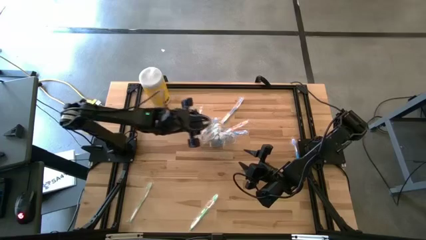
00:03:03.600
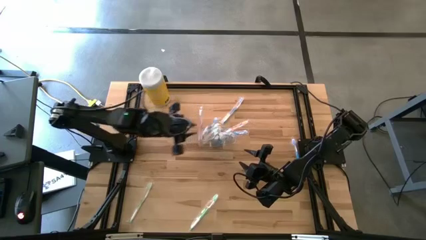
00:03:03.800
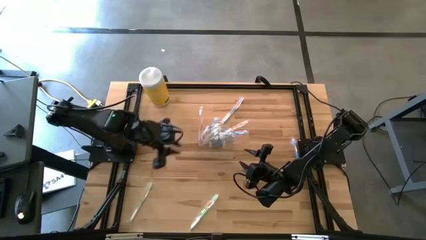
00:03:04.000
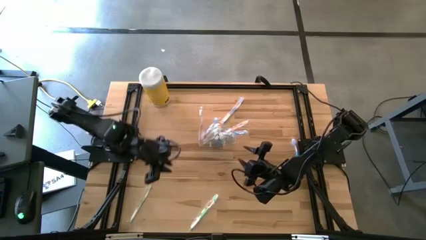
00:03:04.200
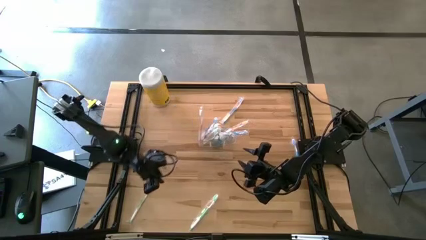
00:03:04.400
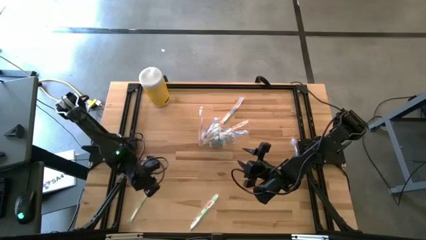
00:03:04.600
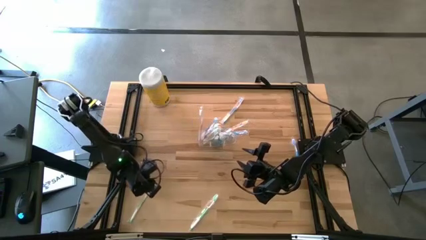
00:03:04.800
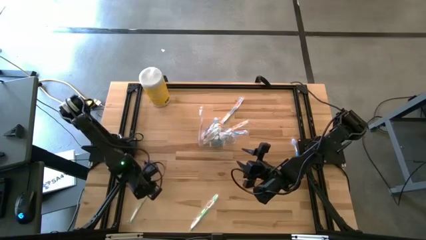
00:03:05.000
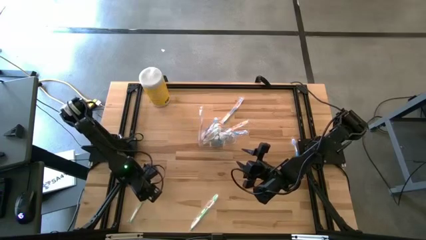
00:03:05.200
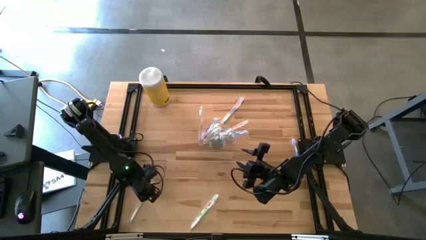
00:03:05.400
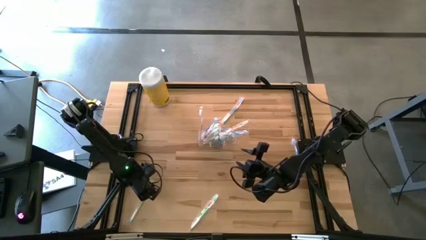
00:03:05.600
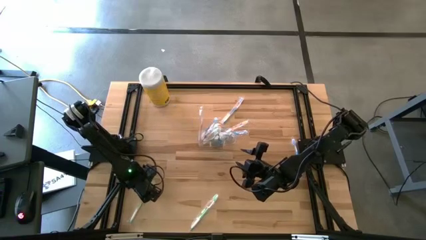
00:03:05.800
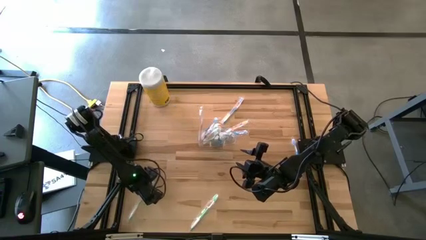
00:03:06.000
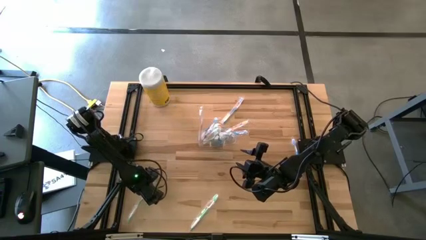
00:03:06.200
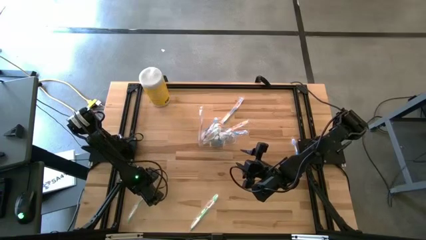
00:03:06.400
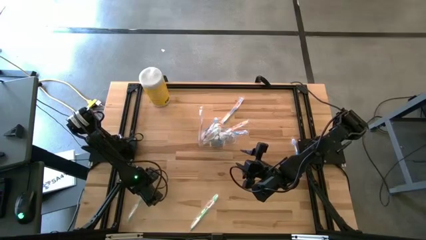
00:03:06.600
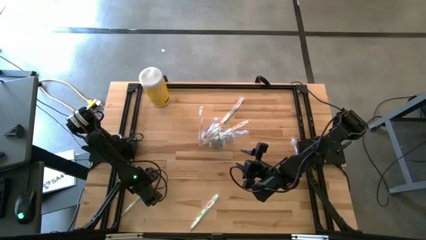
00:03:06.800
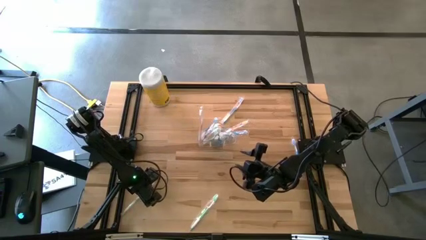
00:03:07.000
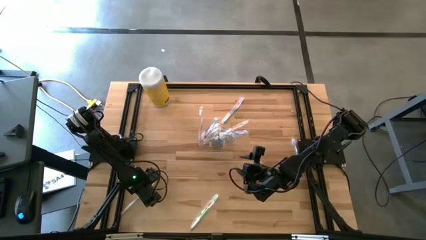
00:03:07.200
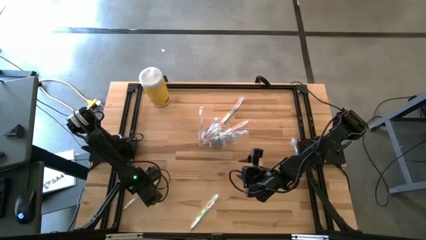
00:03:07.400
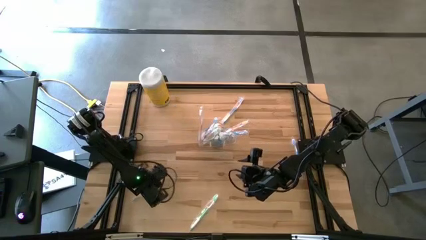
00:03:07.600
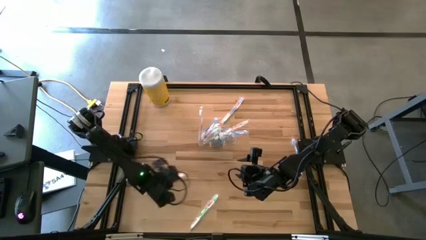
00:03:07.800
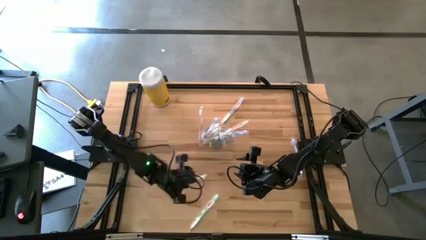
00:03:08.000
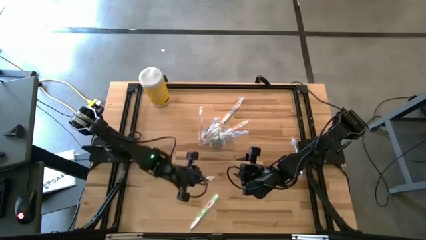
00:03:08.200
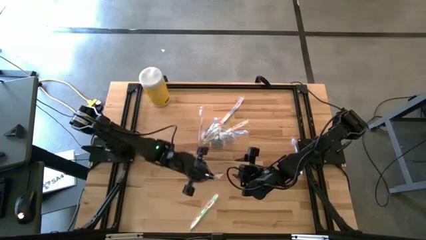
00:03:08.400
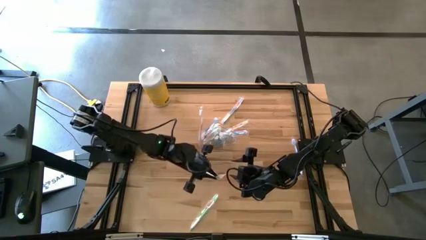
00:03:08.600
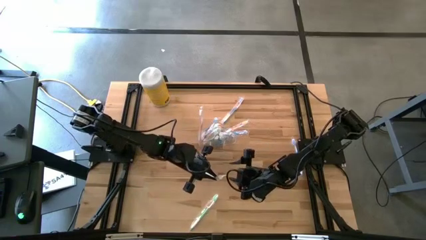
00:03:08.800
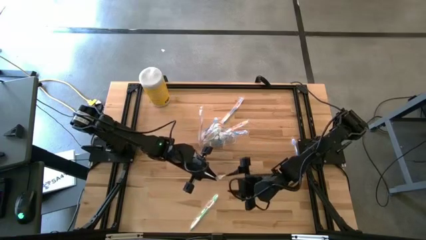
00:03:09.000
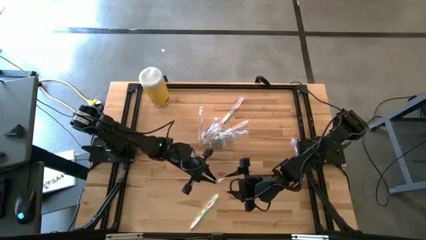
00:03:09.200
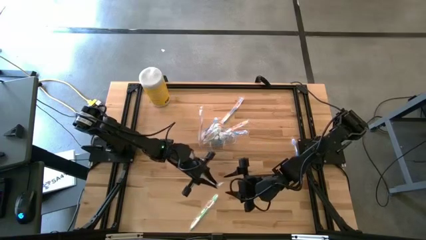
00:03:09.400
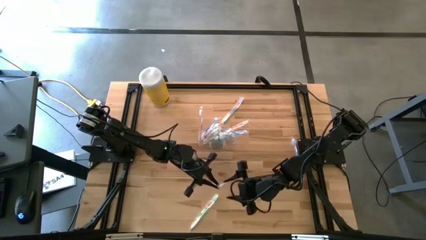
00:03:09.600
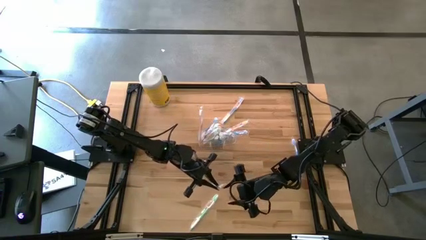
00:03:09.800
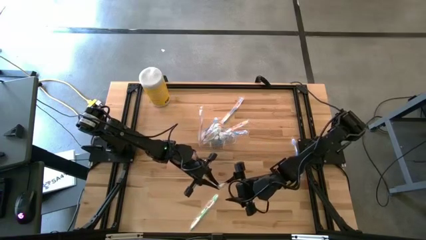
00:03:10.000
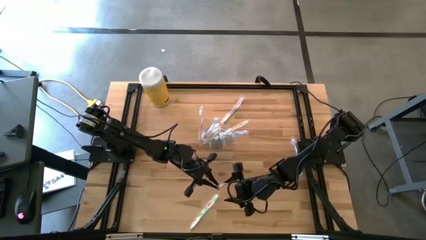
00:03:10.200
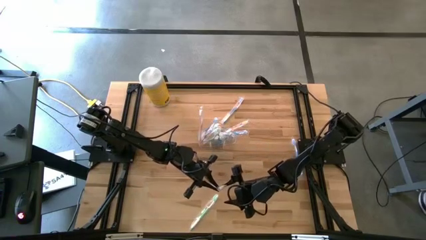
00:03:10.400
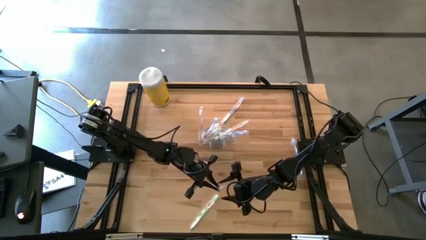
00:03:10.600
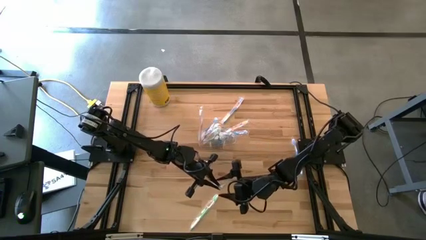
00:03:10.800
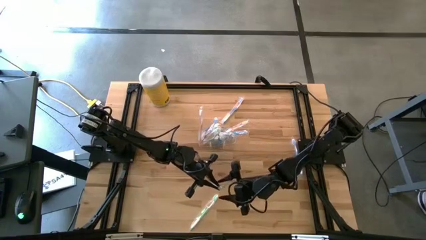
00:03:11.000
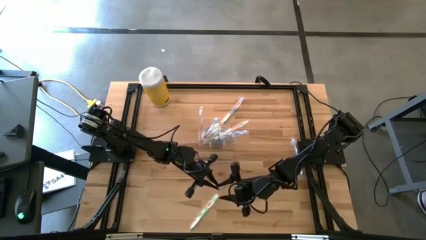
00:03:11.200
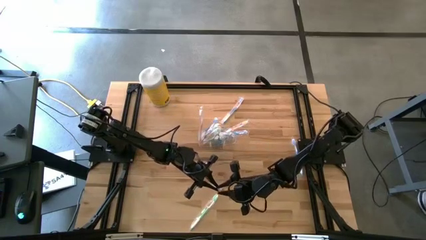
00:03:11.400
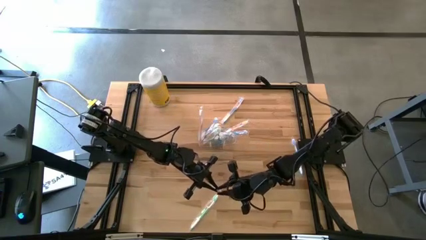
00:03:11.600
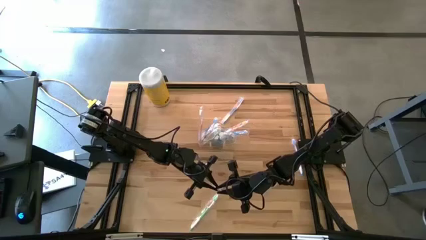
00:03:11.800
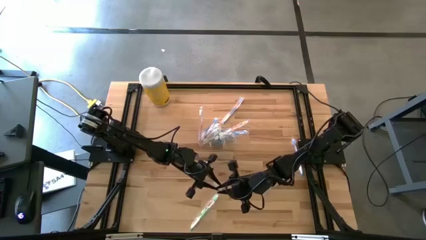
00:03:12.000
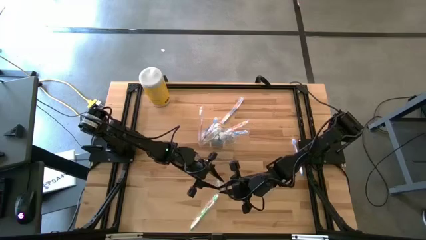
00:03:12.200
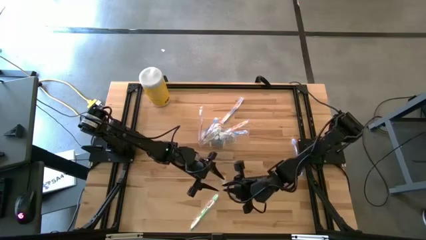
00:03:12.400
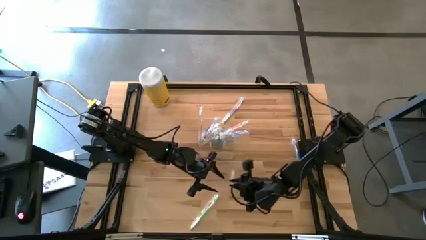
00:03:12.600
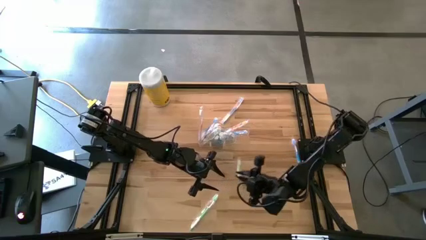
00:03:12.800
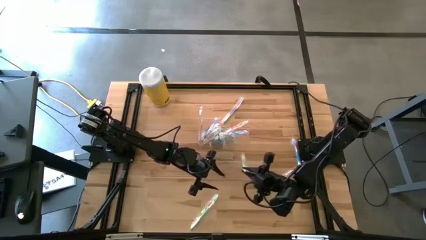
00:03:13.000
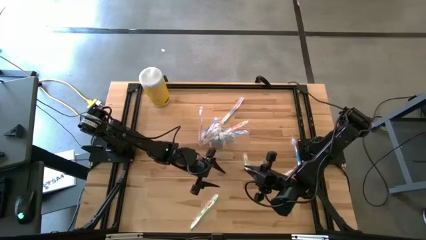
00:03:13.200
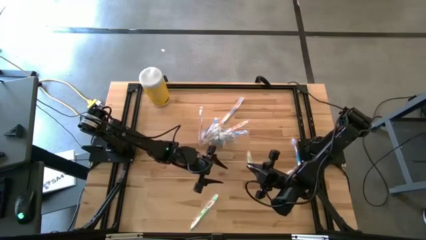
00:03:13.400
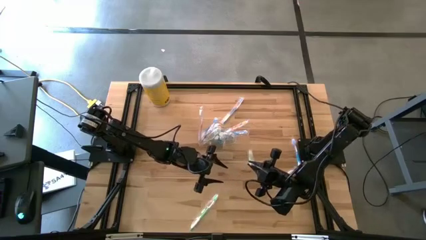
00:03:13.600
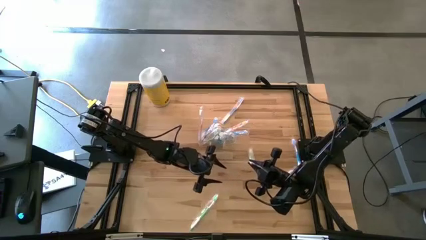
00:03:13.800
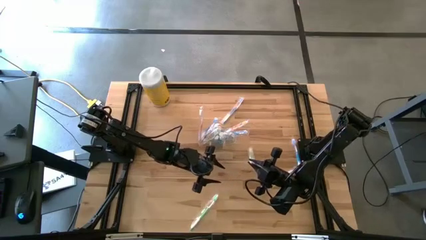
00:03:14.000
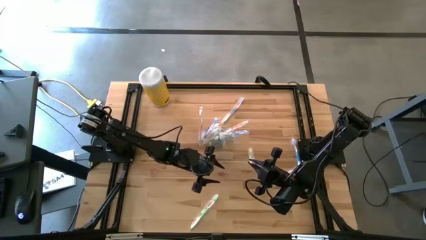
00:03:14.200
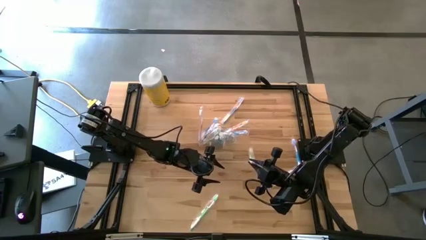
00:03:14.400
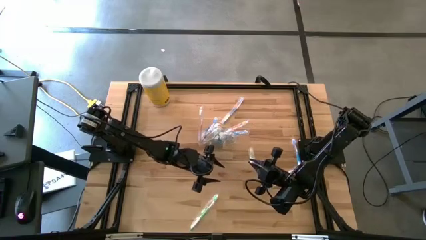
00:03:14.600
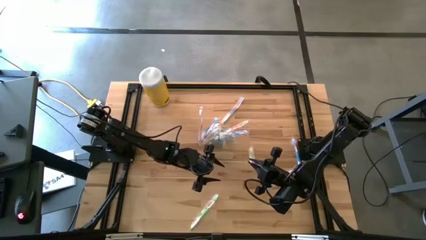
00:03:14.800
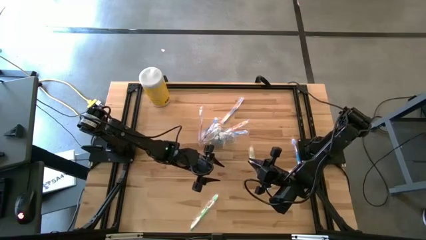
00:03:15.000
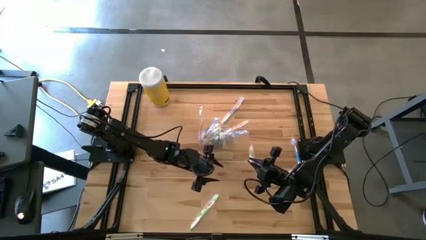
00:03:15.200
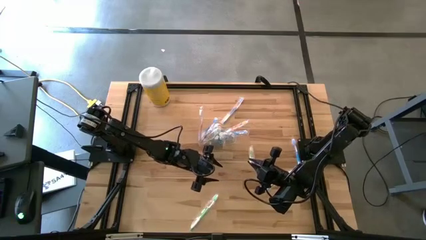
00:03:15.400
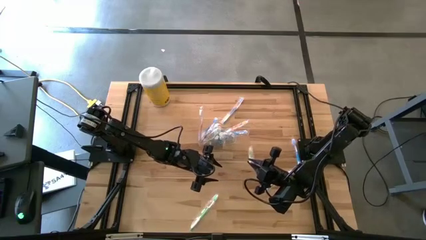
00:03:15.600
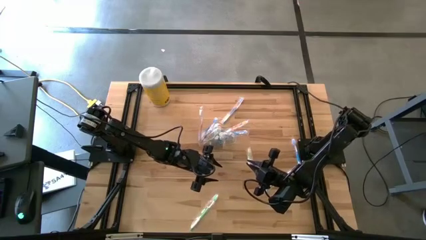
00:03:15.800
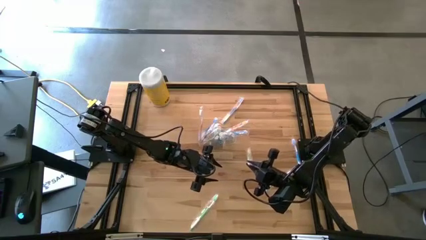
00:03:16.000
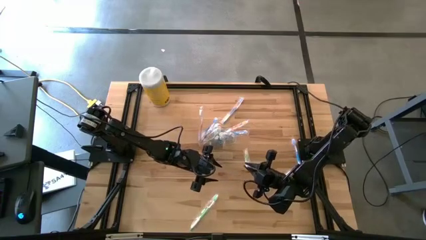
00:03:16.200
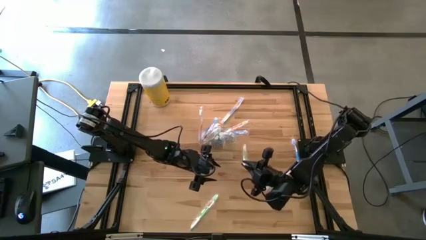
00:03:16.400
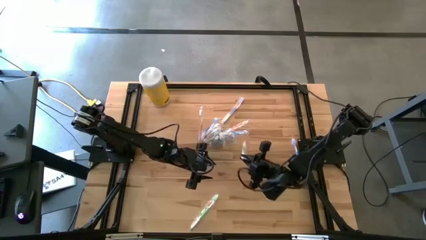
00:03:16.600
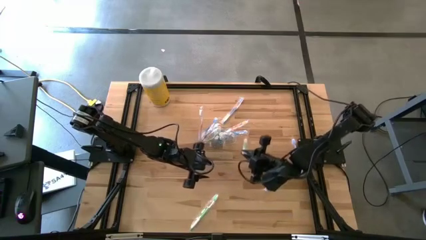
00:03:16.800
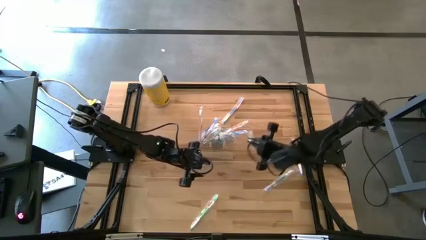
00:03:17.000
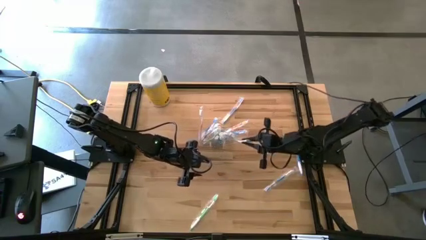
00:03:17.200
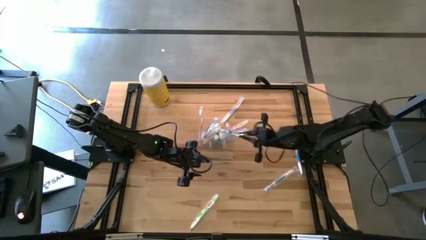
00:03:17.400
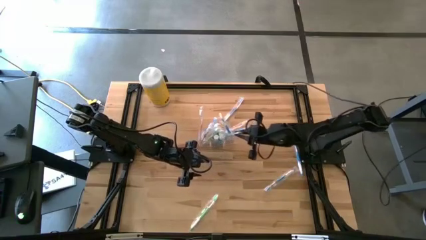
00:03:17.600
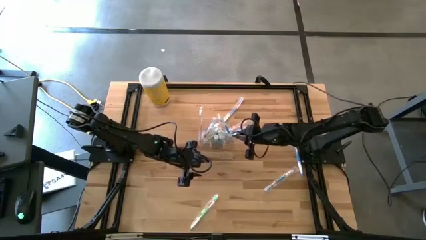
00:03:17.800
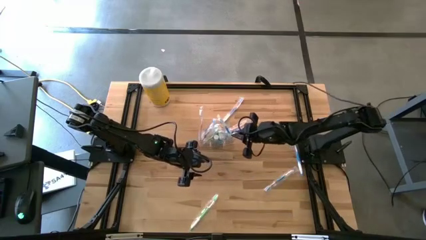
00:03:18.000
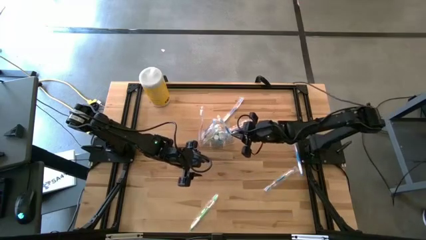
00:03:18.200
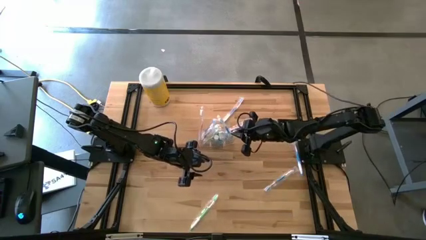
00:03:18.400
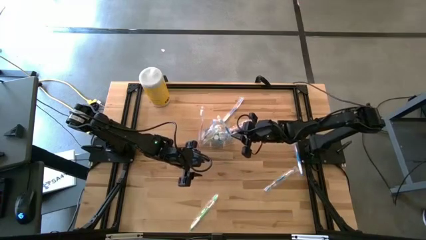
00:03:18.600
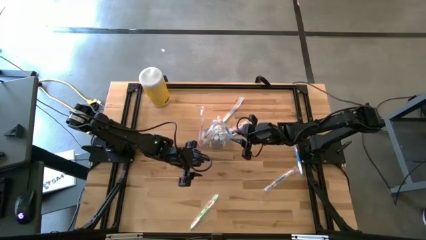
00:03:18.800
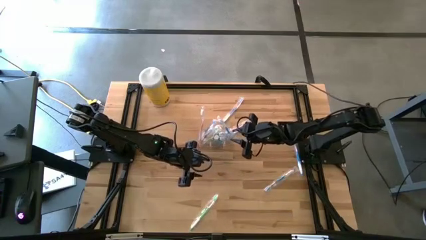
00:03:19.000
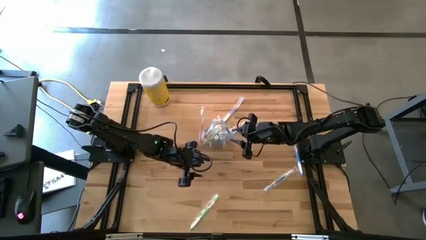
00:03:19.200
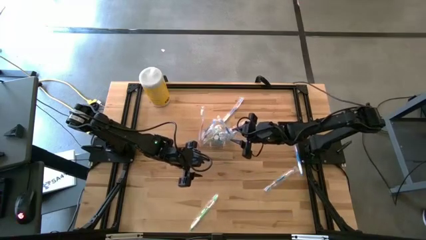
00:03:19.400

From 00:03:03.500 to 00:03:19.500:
Task: Pick & Place toothbrushing station
Put the green toothbrush into the transparent organizer

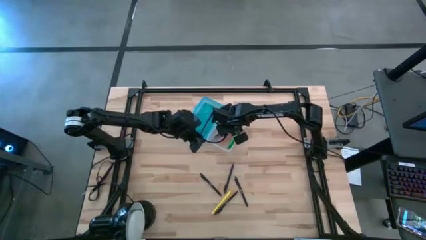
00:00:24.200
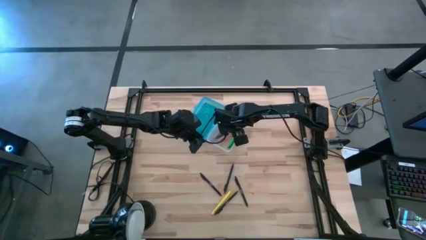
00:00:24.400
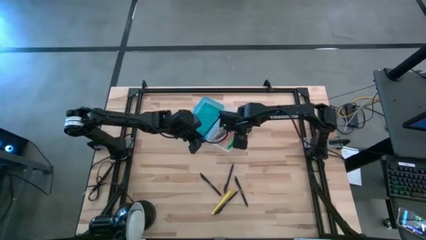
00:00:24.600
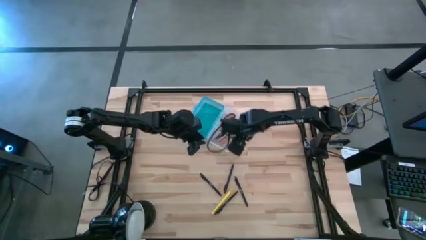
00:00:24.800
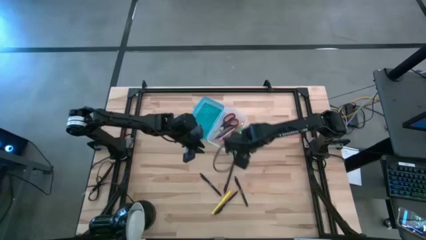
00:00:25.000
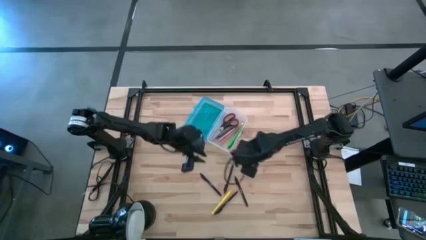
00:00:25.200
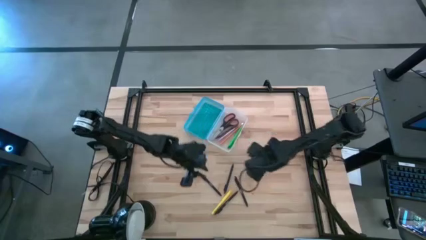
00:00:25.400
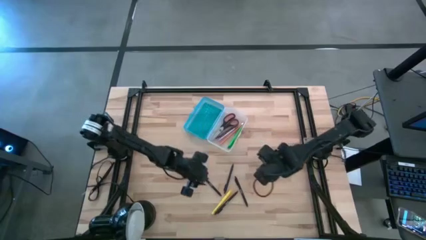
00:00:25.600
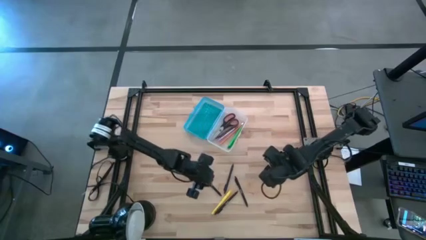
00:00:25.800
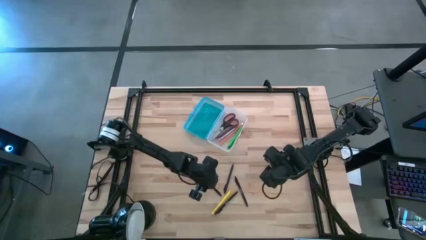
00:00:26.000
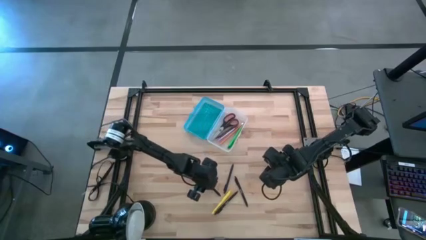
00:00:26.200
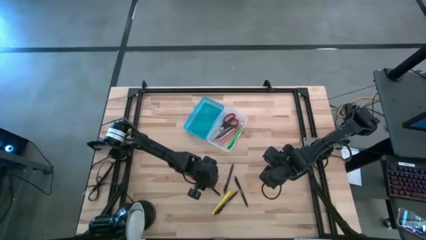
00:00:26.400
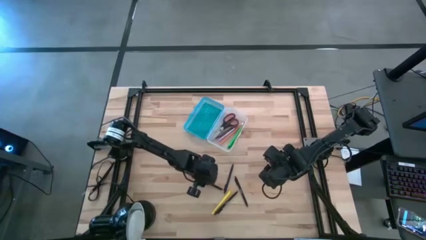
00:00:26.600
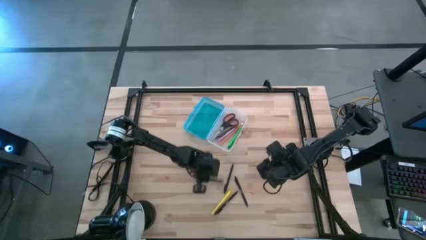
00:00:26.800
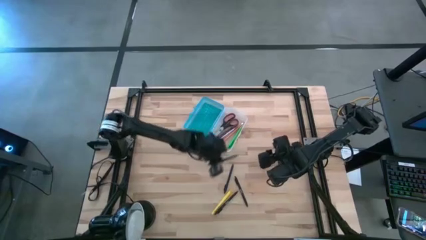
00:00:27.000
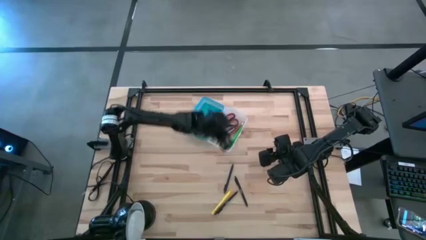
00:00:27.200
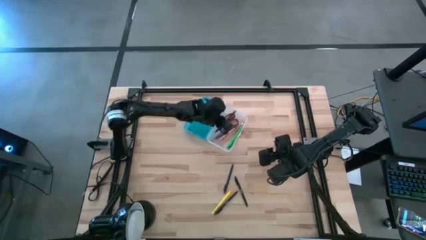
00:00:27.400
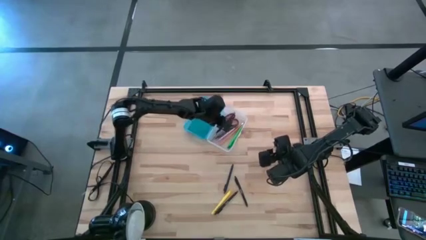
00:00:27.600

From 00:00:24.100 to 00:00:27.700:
Task: Pick & place school supplies into a supply box
Put the black pen into the blue supply box
